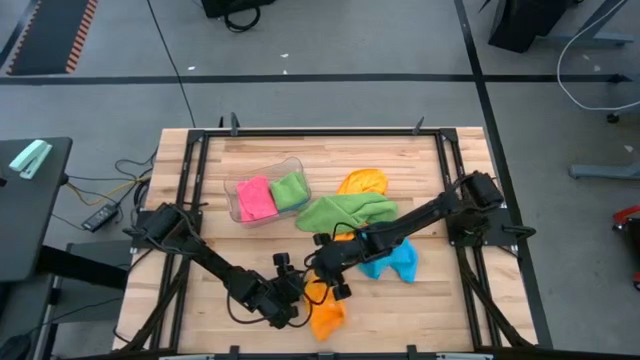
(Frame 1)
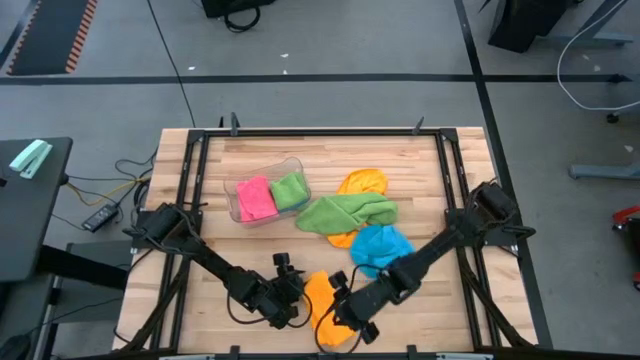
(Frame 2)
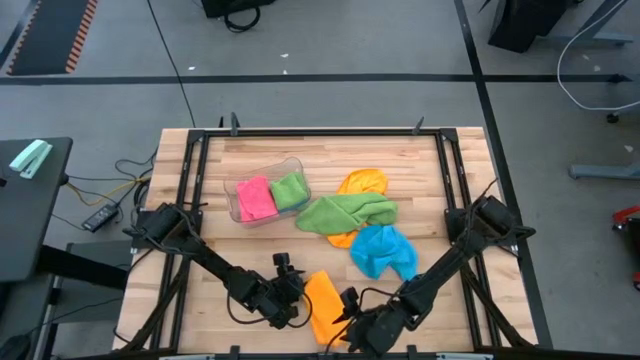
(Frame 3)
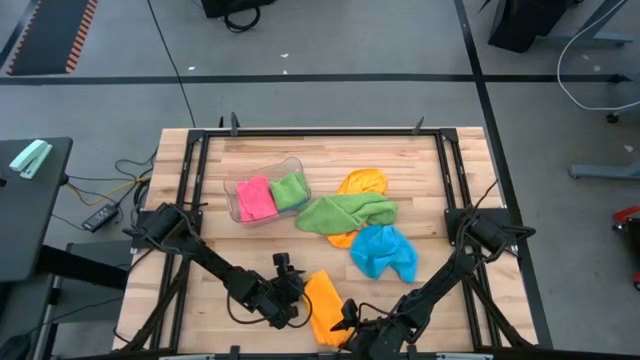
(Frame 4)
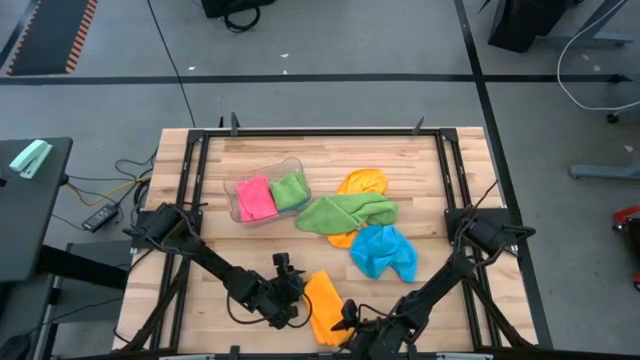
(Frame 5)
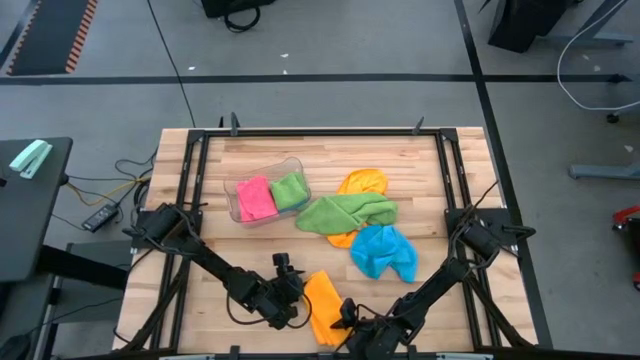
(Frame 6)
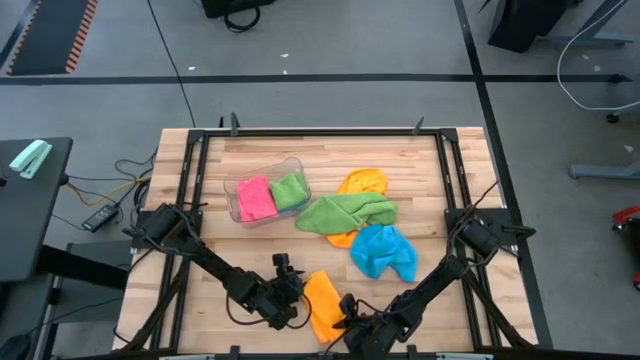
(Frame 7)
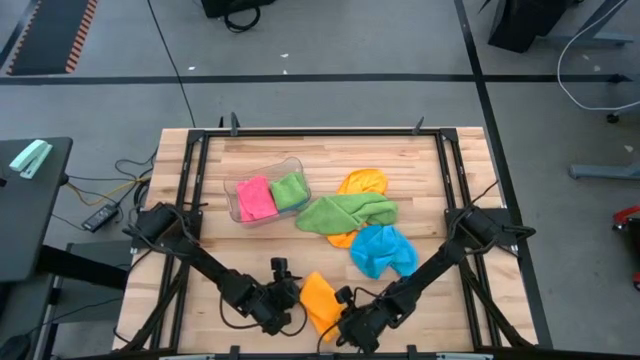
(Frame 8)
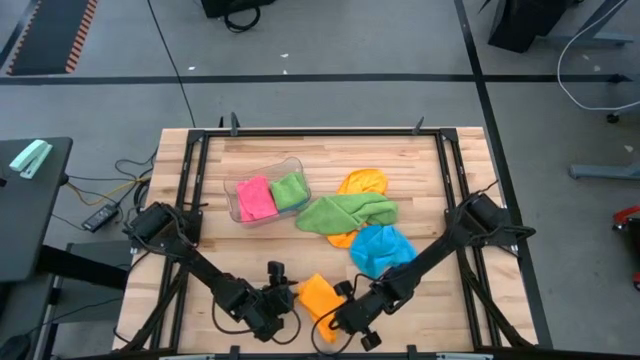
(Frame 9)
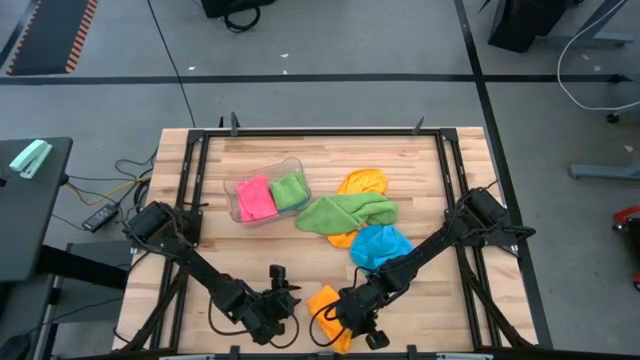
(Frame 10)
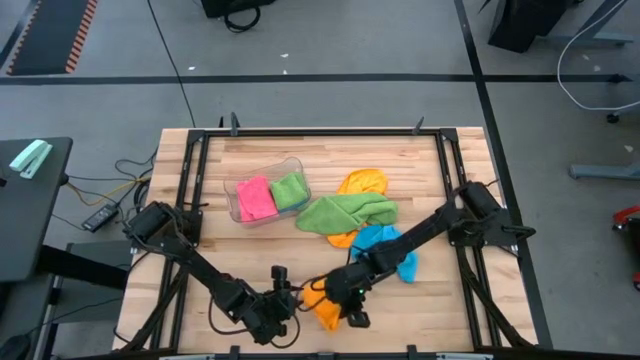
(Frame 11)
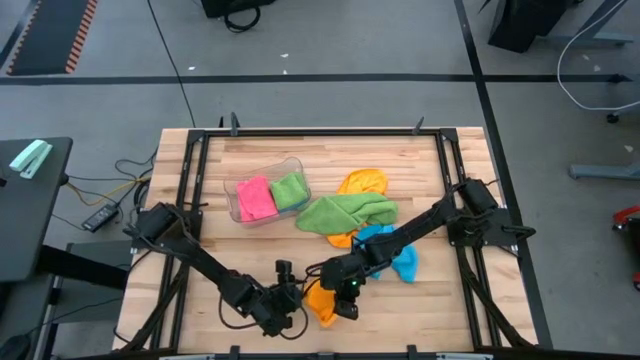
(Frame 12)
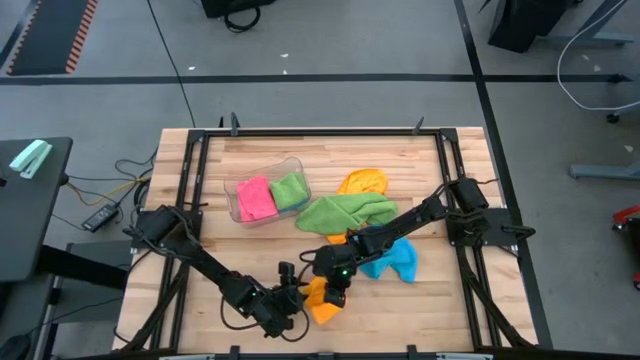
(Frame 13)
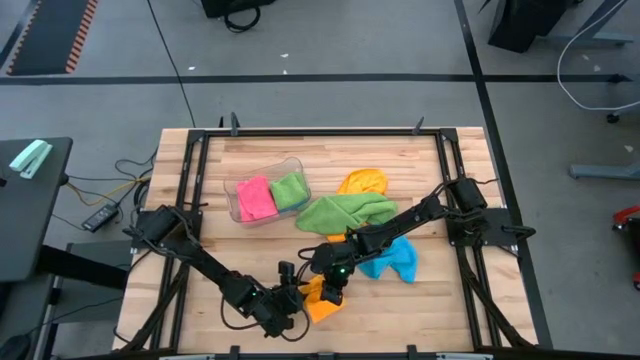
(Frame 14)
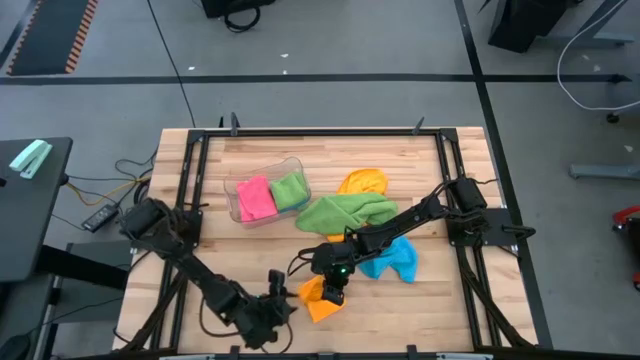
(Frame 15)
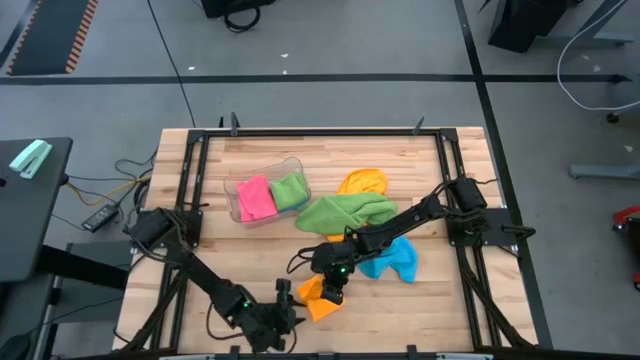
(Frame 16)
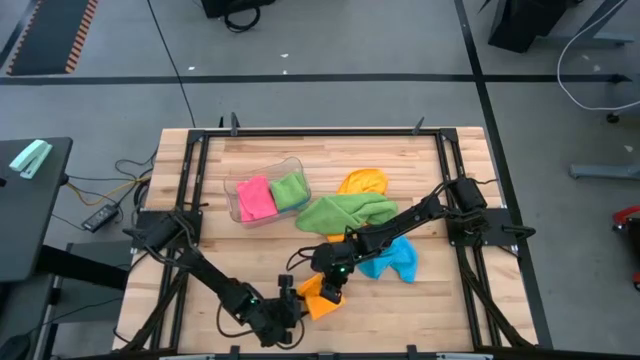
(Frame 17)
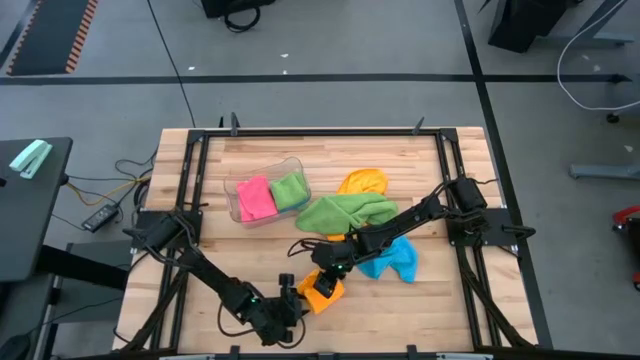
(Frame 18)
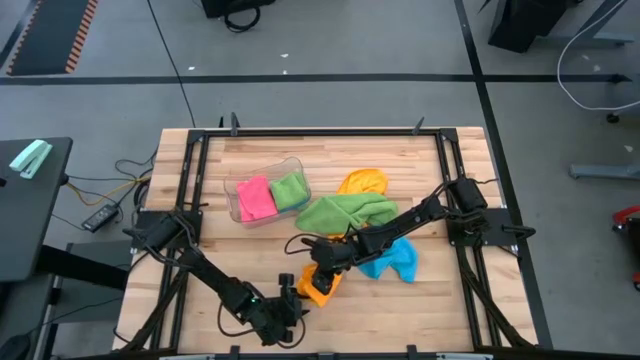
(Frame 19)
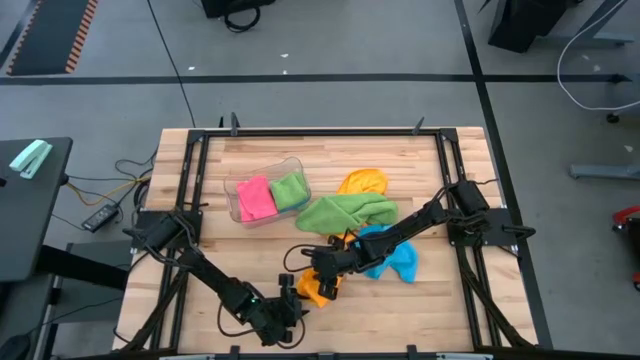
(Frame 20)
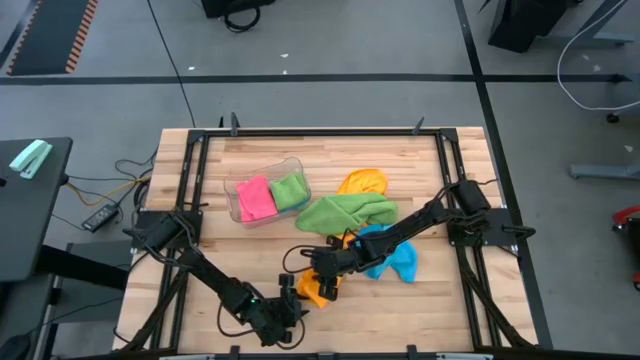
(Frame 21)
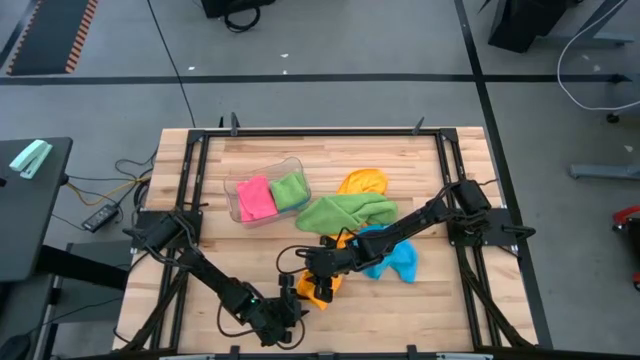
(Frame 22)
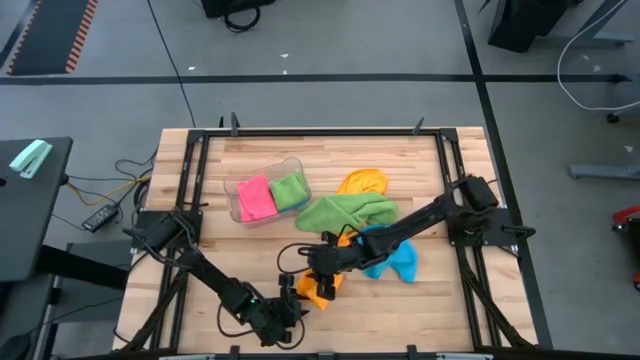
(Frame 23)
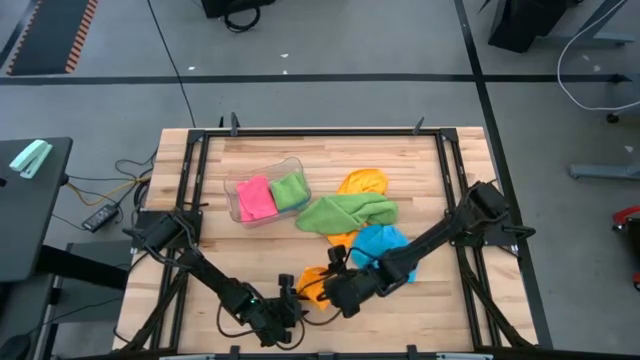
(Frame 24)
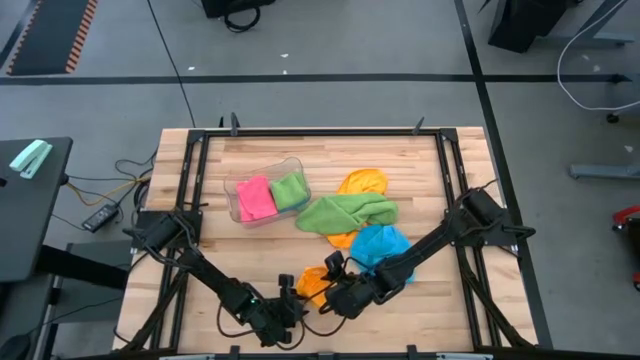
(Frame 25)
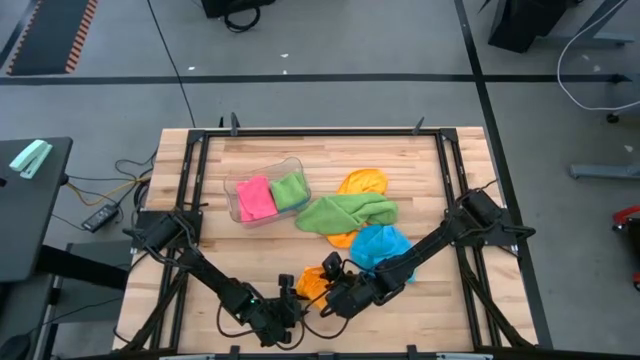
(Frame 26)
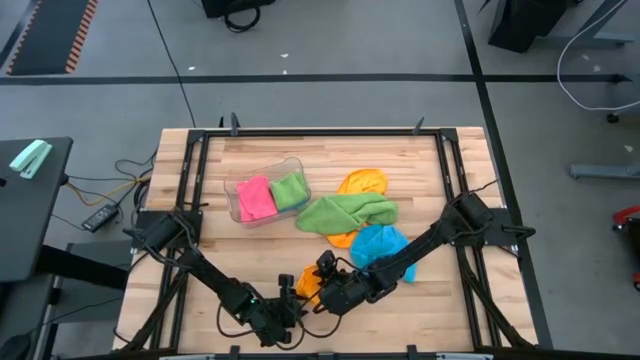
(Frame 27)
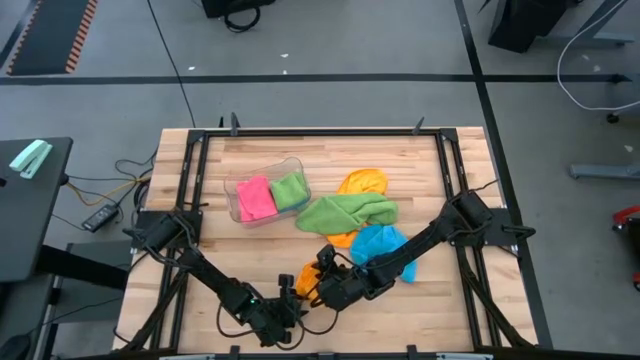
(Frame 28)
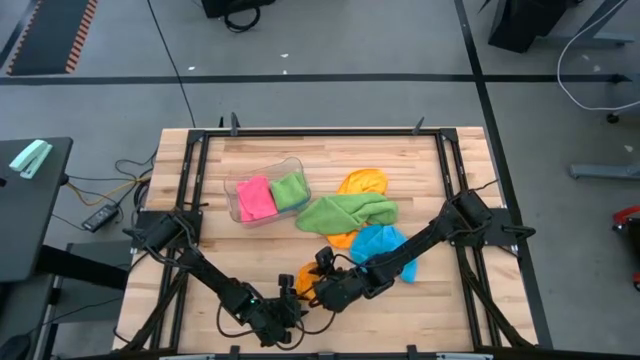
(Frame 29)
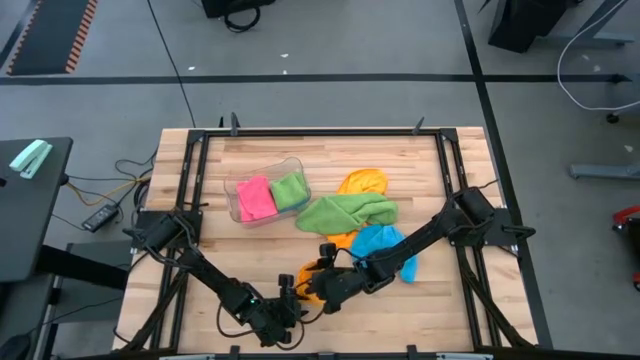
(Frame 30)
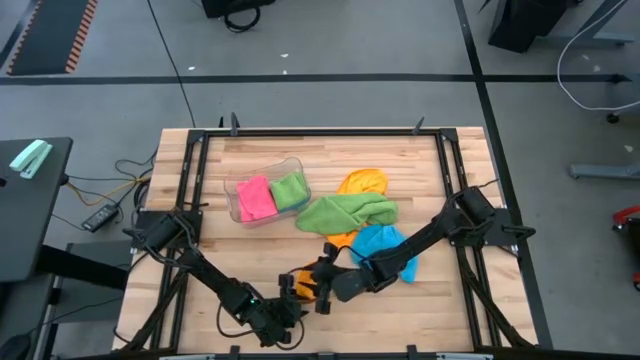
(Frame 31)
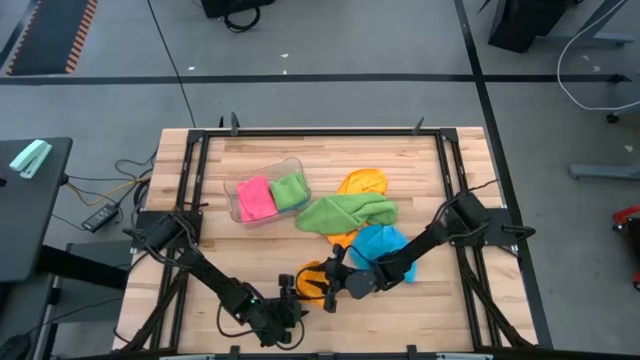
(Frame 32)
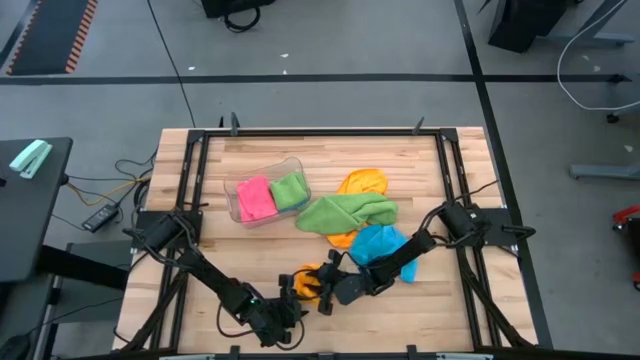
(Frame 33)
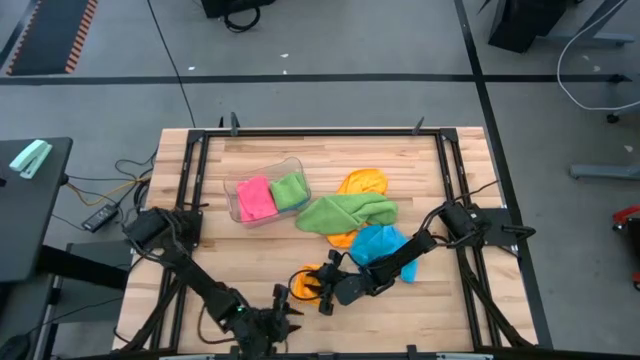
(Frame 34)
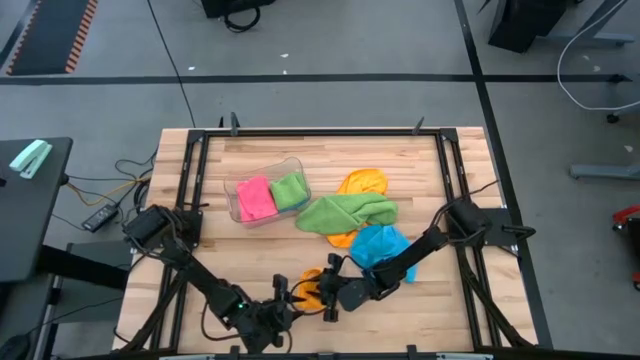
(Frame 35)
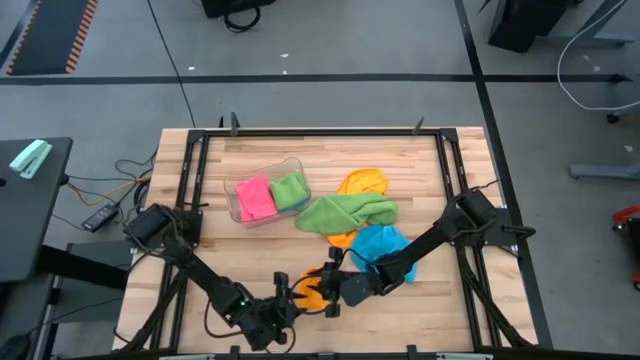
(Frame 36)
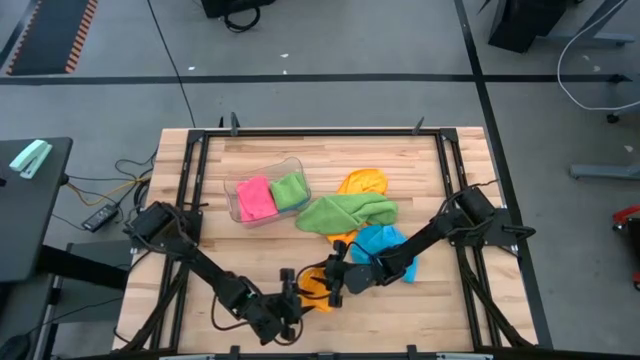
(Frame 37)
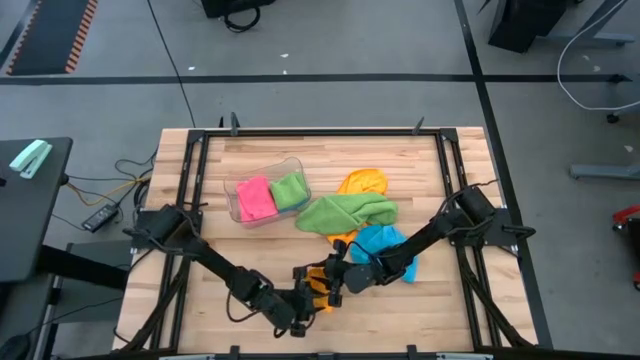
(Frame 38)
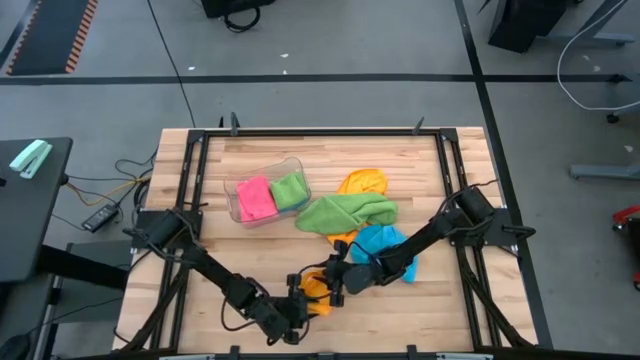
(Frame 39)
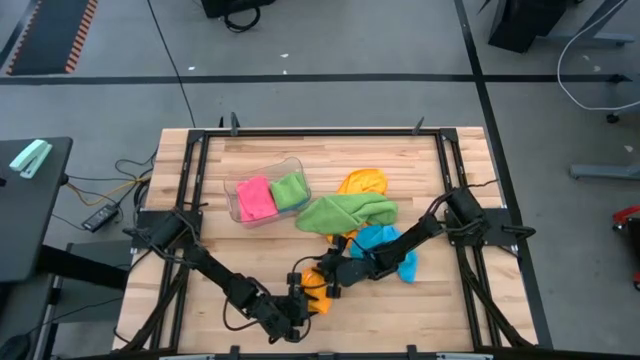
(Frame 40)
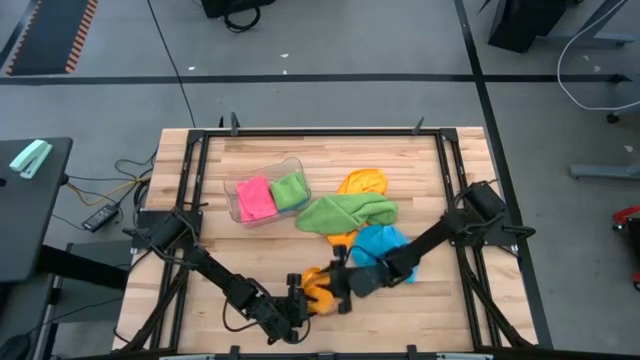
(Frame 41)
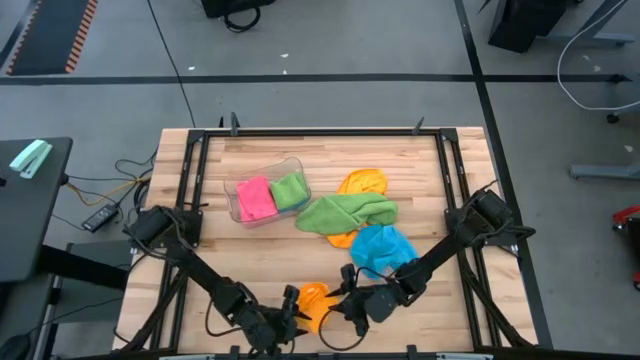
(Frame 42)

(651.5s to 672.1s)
Task: Fold microfiber towels
Fold the bottom yellow microfiber towel
